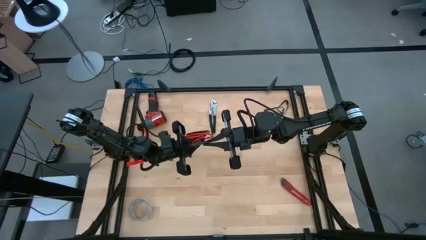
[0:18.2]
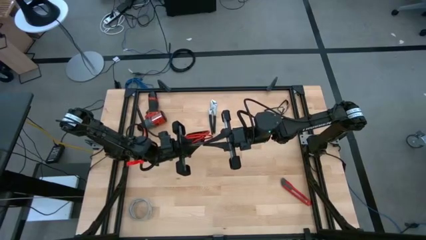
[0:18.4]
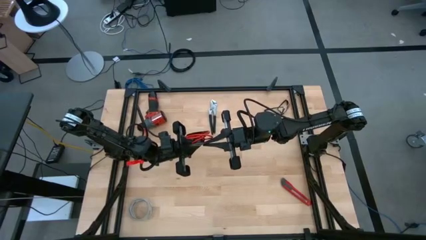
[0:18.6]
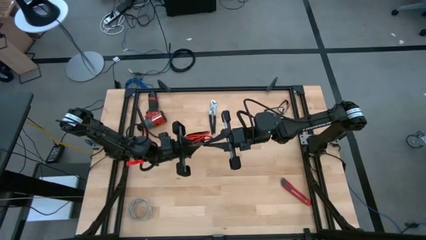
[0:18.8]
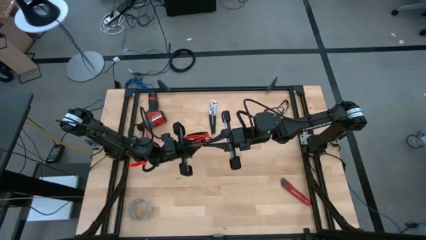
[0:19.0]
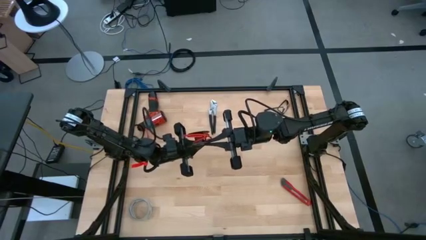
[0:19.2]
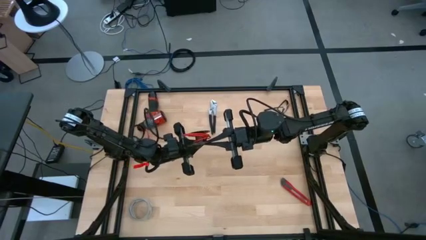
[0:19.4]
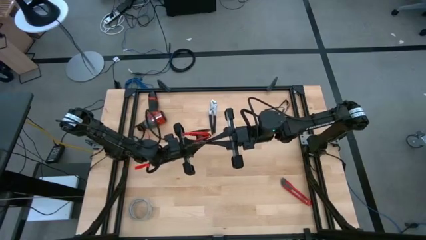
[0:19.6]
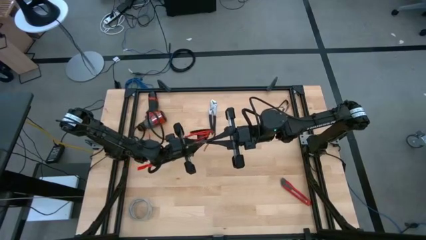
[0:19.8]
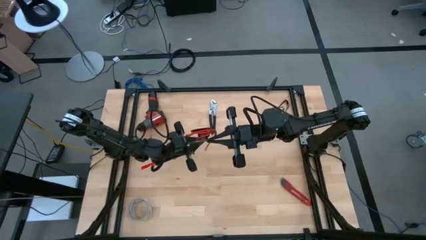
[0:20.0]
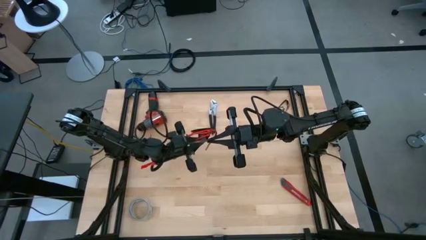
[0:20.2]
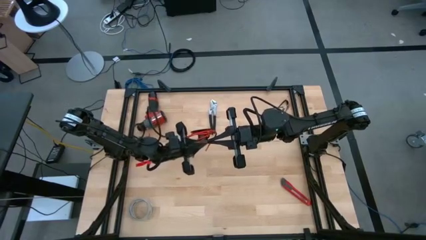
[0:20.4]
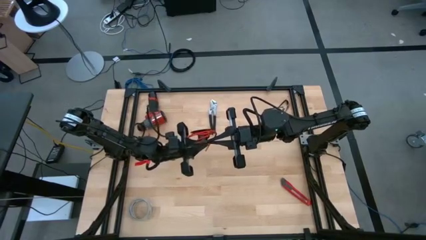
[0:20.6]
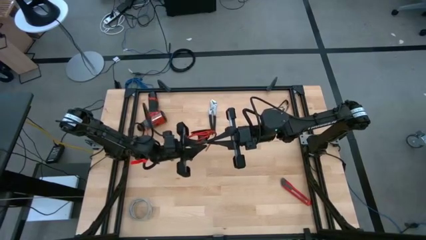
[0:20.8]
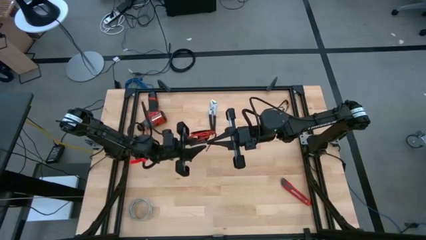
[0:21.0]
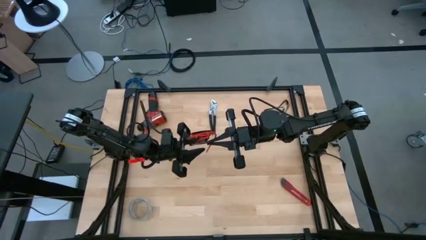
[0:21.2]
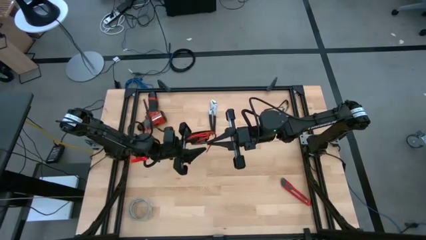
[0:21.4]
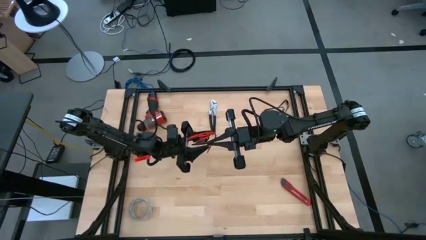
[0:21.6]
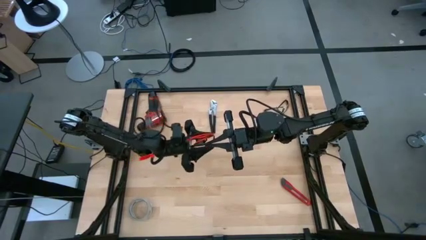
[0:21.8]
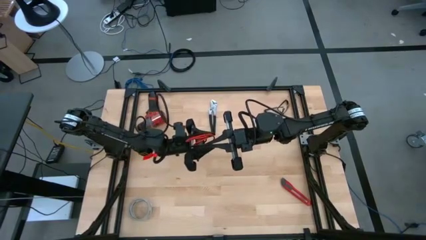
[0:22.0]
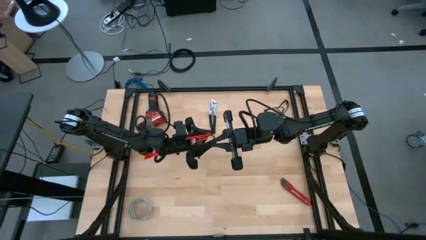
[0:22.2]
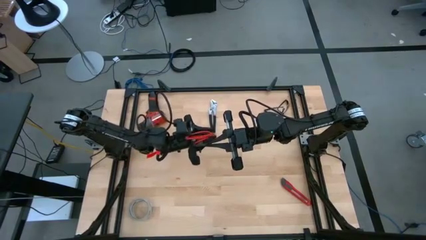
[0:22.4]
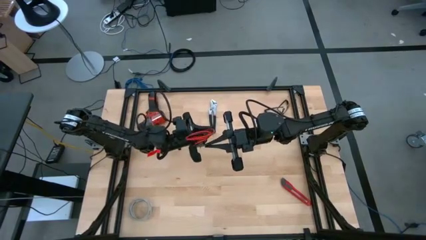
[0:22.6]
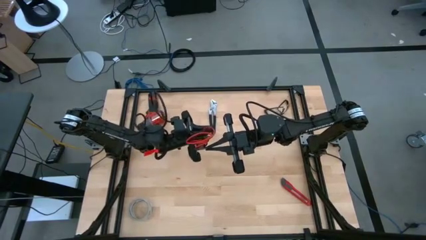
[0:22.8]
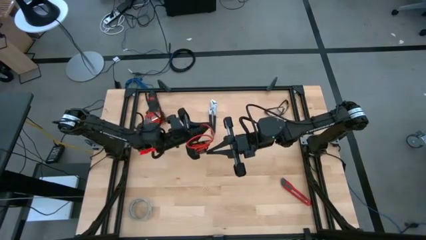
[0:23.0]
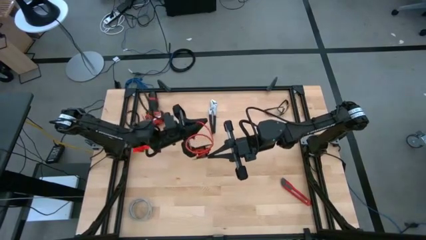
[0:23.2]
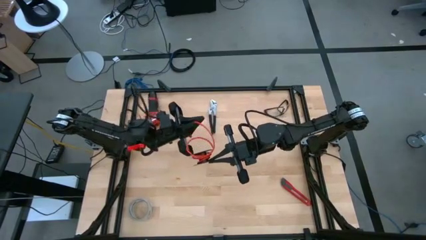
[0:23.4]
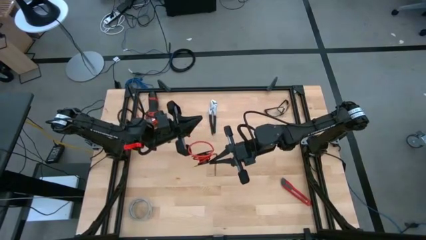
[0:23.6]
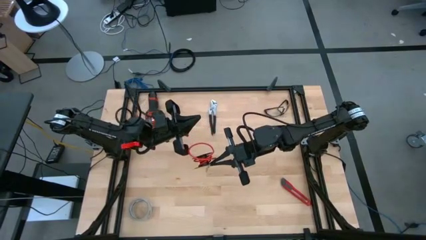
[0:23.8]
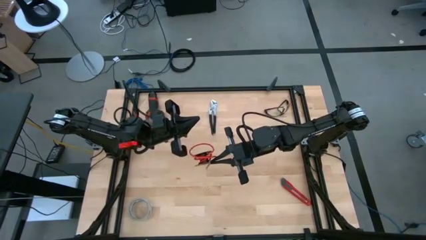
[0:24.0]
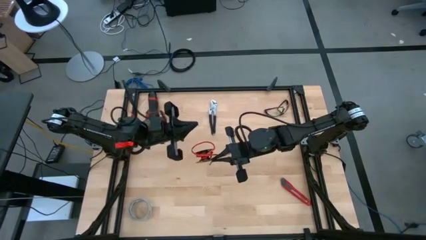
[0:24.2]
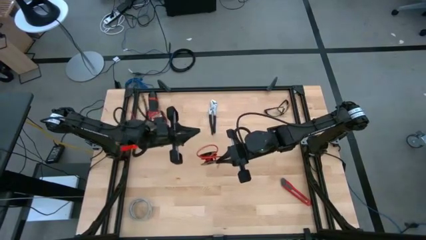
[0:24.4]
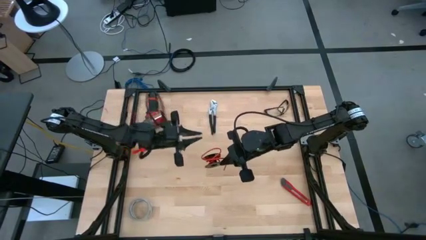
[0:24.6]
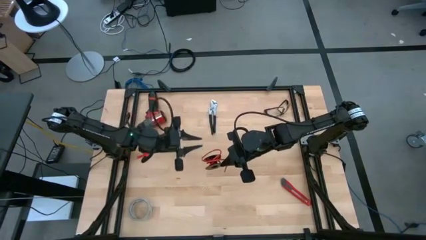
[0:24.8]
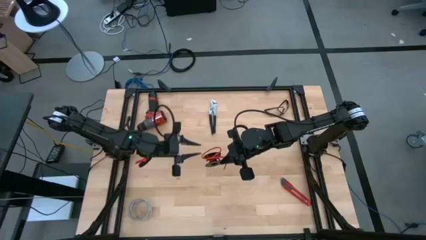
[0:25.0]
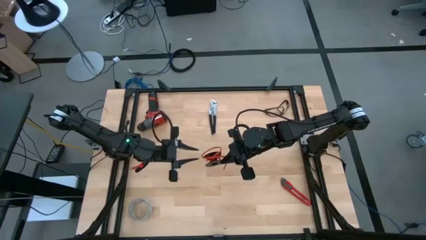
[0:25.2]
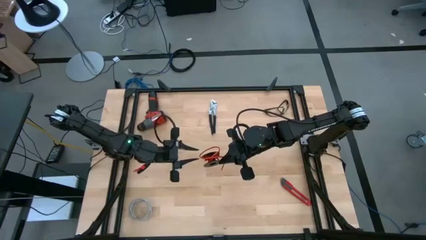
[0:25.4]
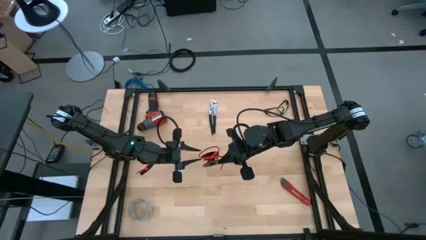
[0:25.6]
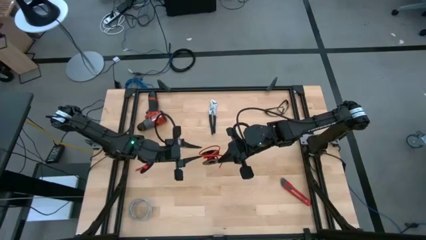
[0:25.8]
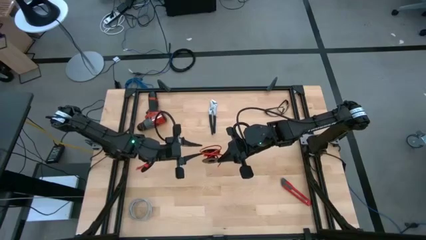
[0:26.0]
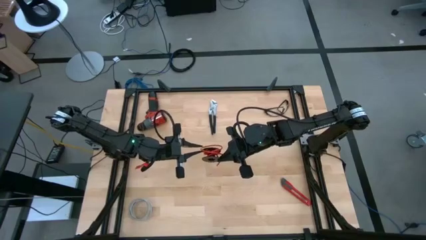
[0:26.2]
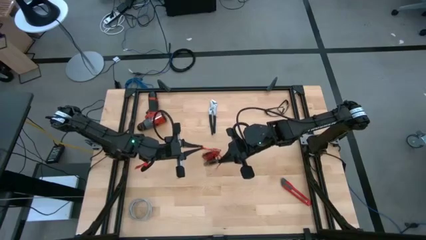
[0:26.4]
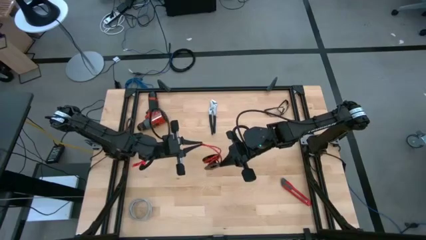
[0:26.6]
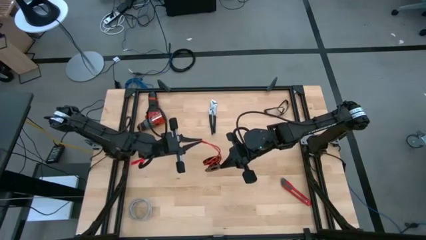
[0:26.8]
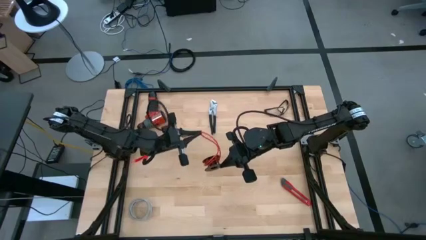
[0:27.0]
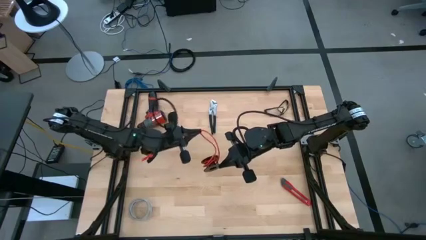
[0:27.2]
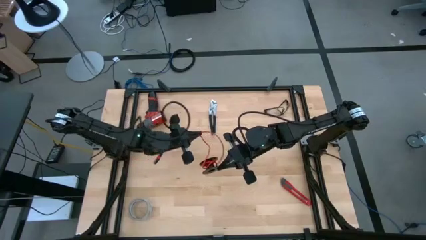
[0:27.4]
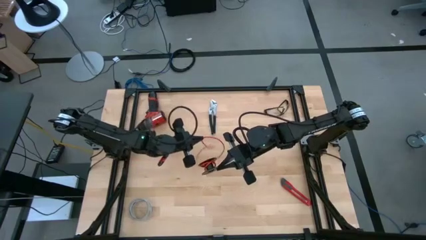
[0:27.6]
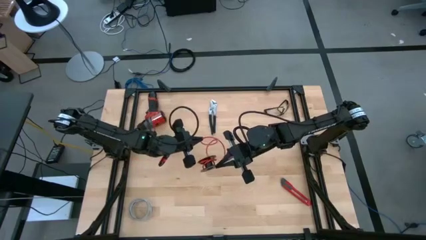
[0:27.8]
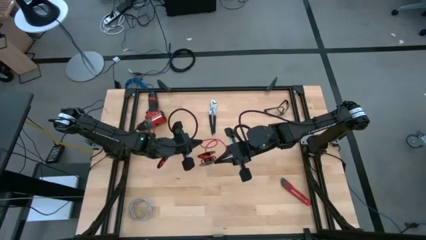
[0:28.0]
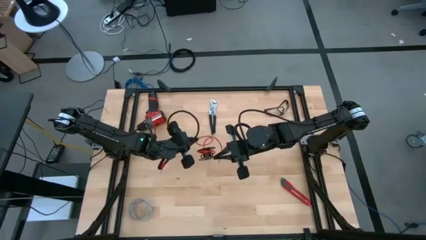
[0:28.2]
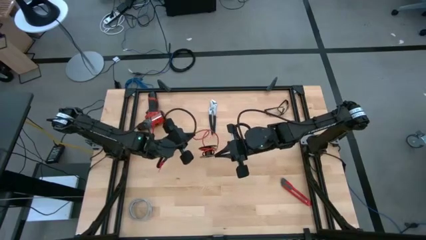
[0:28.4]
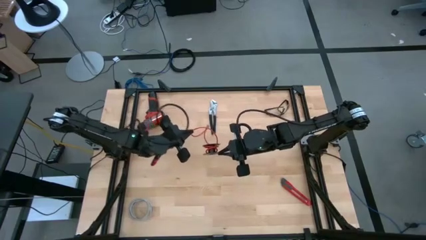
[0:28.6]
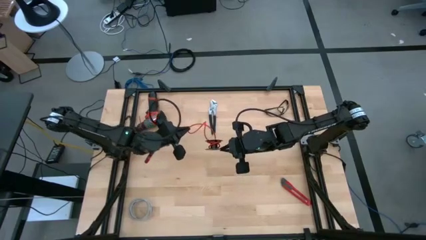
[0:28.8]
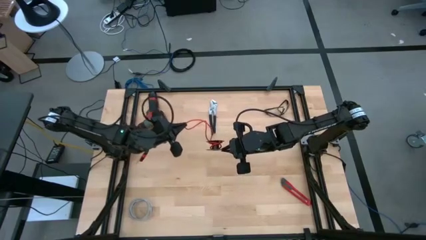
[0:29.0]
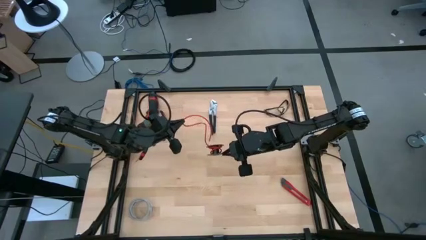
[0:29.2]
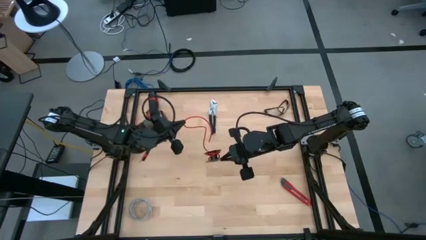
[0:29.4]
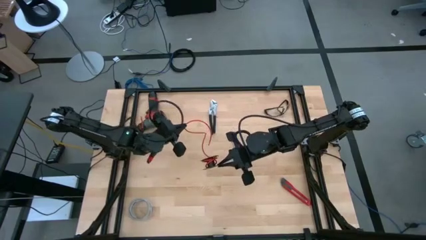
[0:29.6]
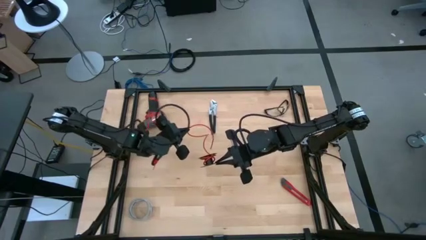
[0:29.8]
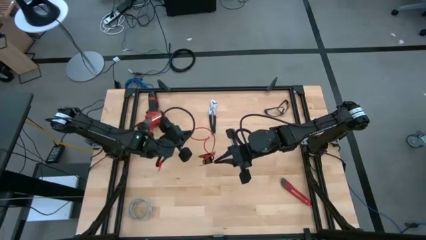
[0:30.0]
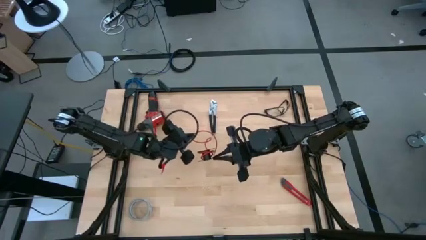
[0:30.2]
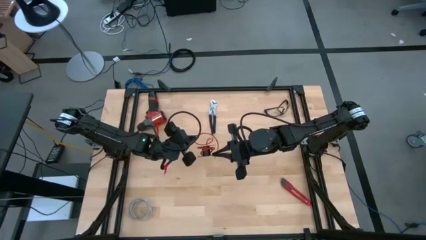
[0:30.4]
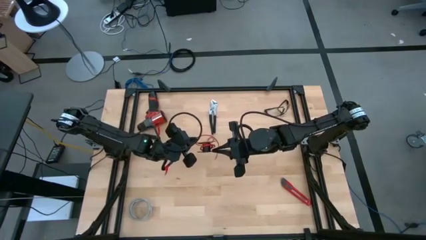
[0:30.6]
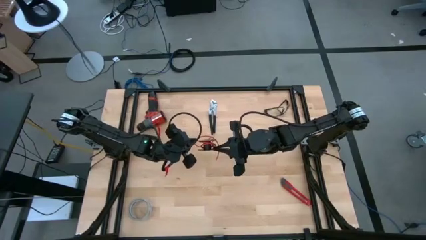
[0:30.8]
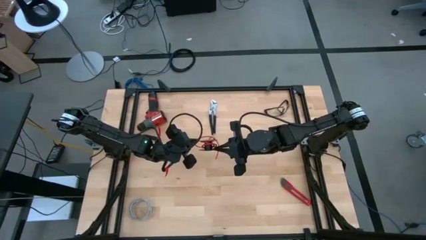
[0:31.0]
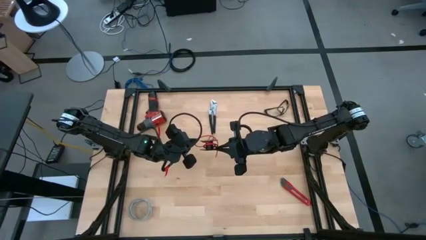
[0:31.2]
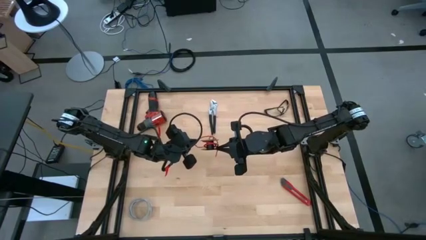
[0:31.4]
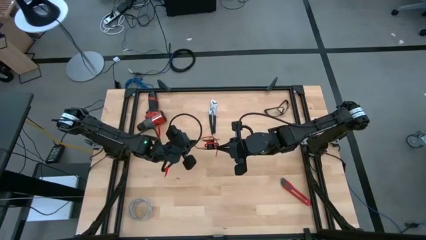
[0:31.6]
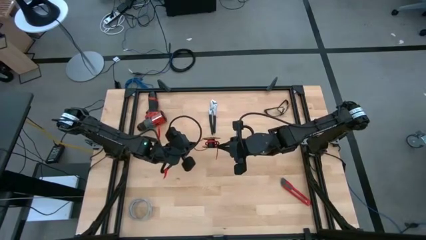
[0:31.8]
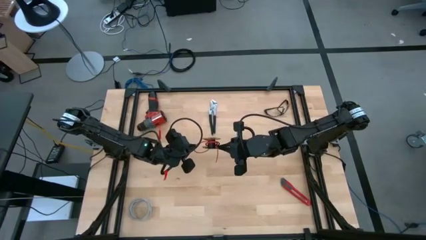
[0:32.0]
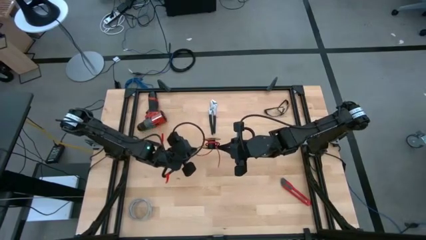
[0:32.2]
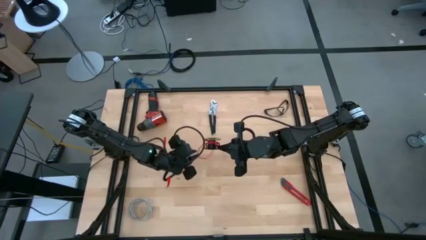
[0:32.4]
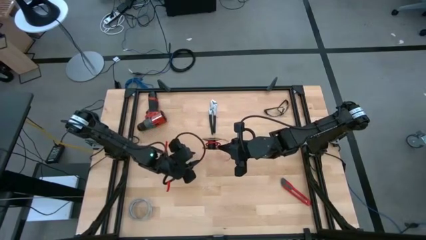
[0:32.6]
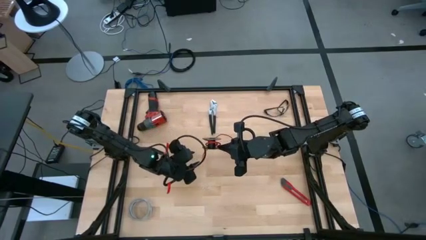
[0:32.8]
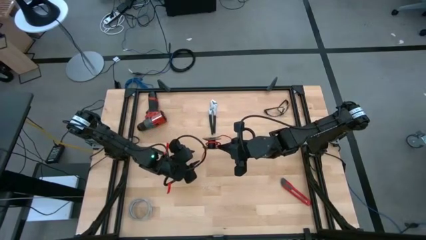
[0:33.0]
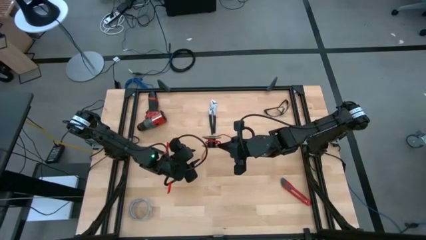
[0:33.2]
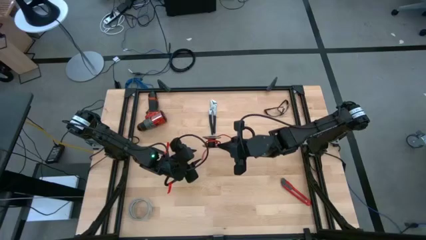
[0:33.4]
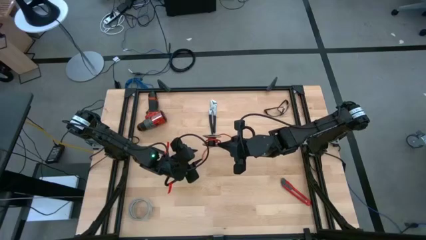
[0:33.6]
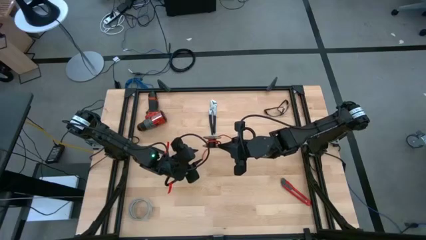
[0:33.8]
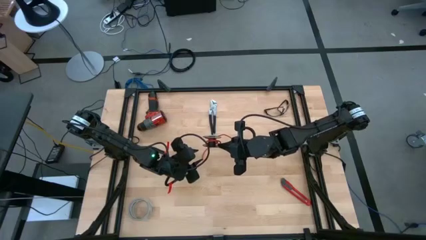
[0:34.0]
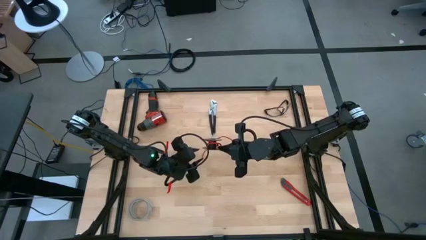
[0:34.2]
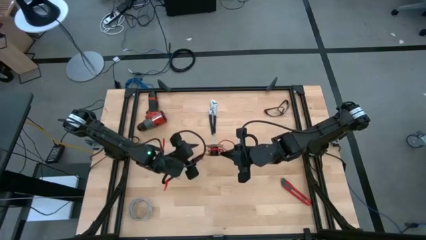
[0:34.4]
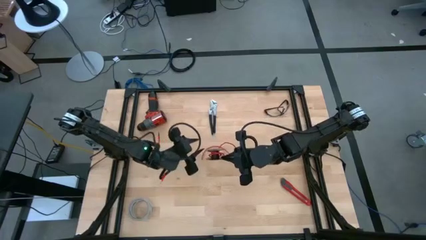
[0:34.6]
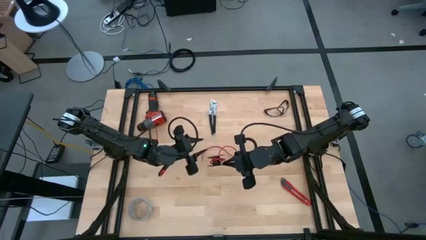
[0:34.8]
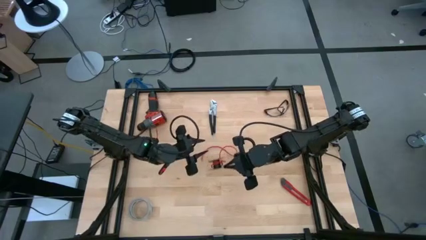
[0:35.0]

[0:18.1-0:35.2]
Task: Coil cords
Uncoil the red wire from the black spool
